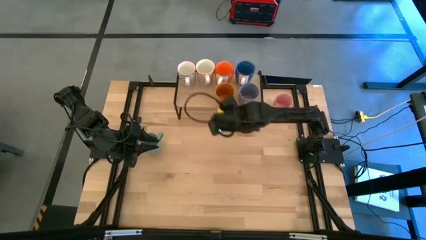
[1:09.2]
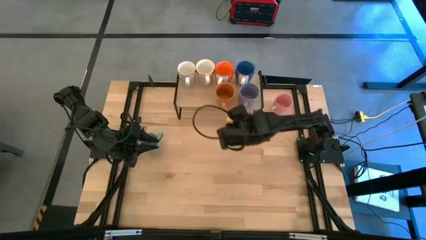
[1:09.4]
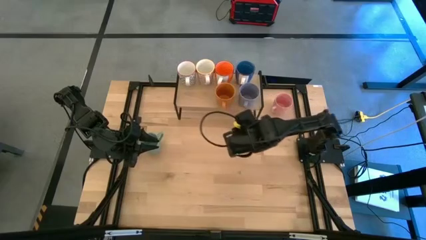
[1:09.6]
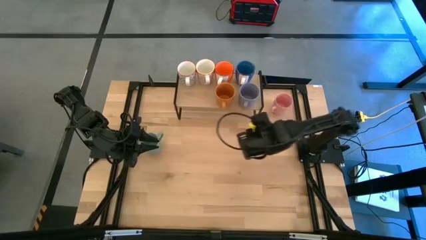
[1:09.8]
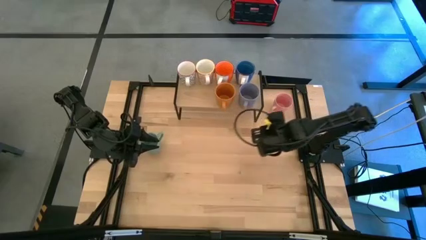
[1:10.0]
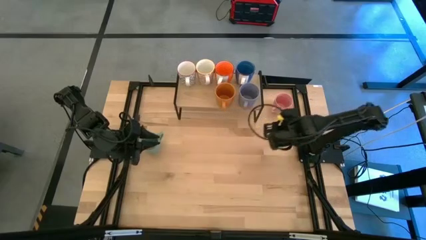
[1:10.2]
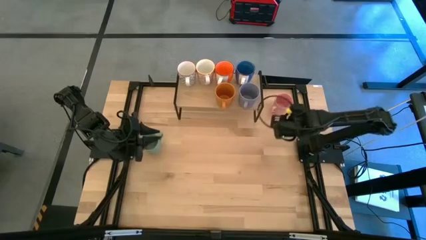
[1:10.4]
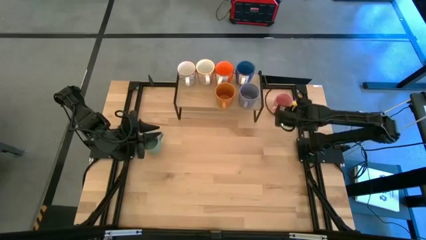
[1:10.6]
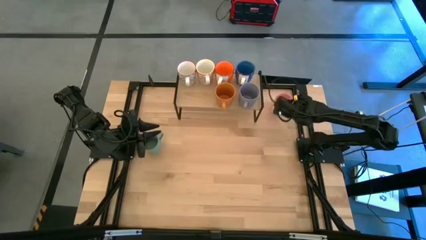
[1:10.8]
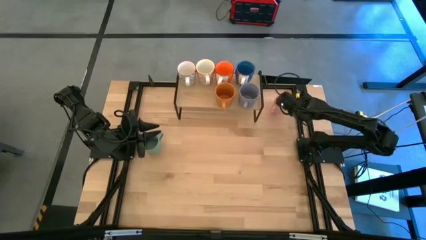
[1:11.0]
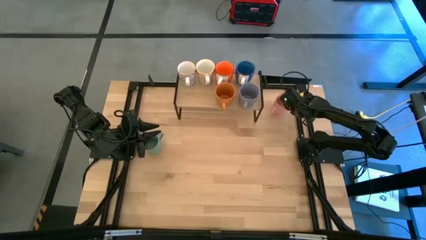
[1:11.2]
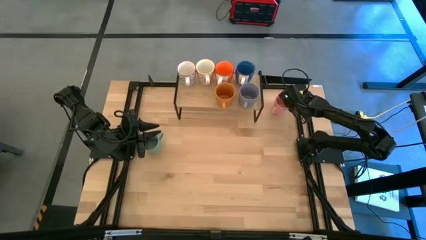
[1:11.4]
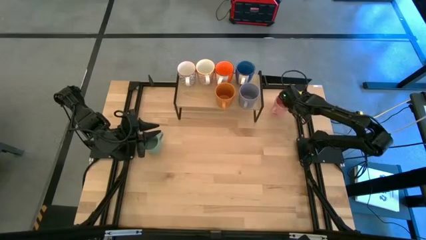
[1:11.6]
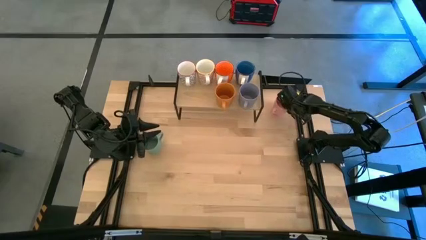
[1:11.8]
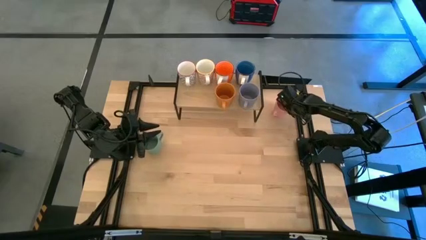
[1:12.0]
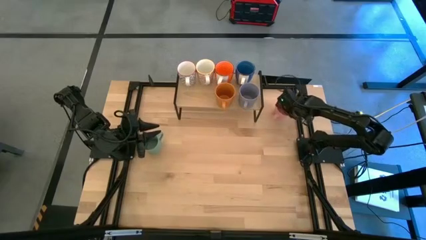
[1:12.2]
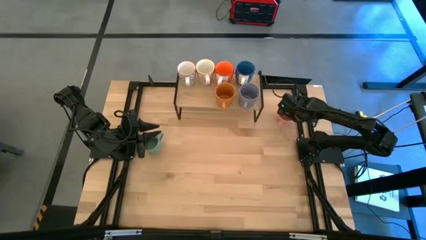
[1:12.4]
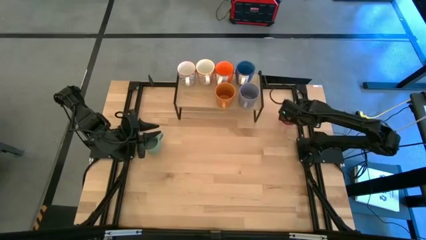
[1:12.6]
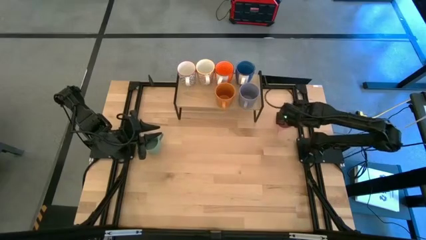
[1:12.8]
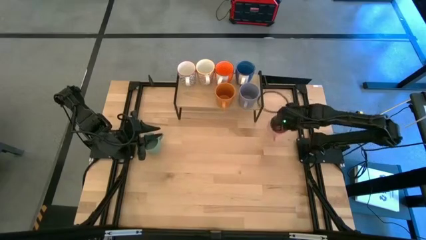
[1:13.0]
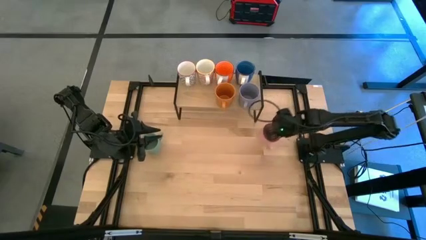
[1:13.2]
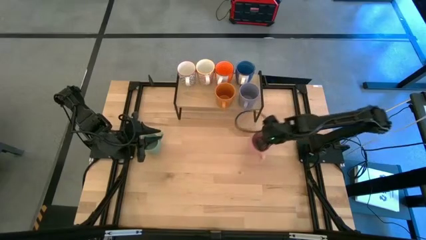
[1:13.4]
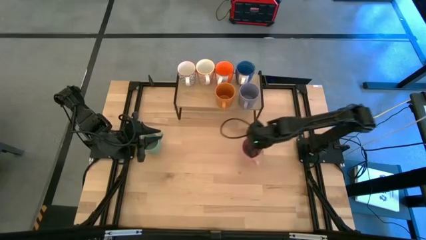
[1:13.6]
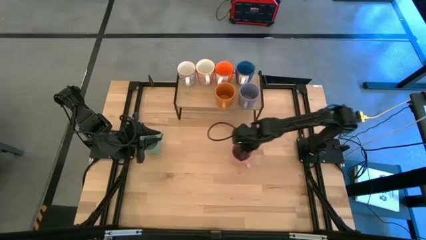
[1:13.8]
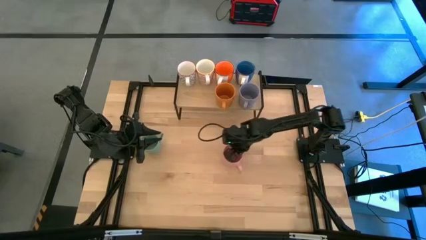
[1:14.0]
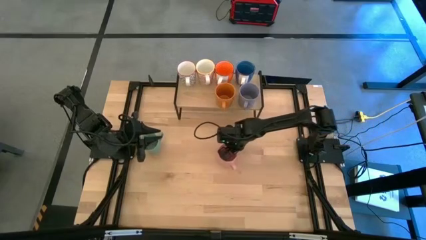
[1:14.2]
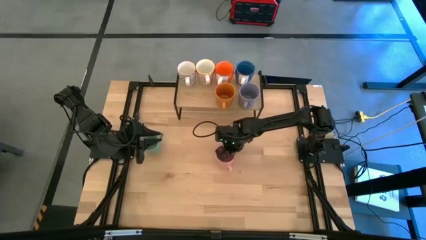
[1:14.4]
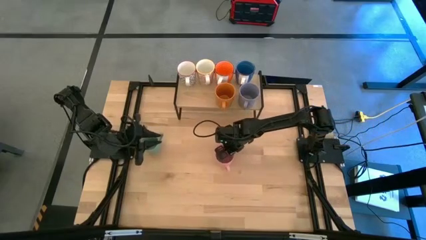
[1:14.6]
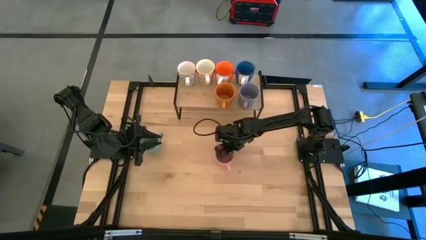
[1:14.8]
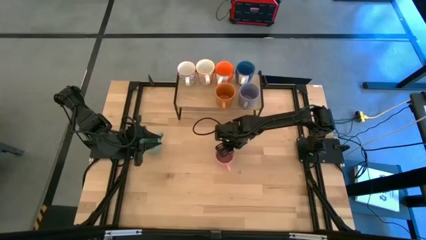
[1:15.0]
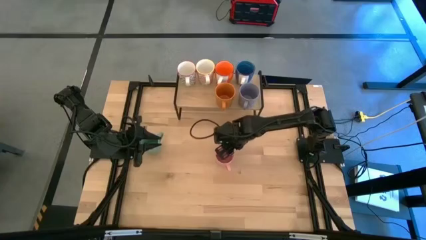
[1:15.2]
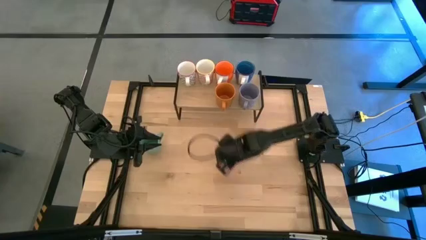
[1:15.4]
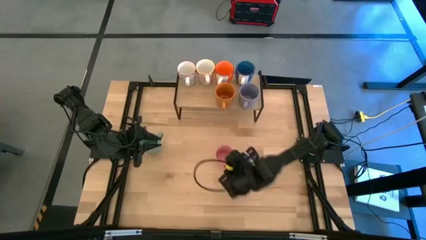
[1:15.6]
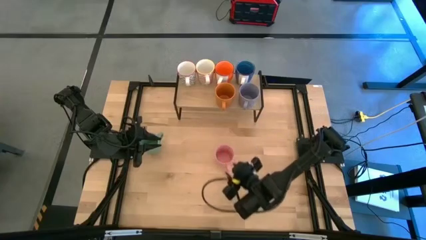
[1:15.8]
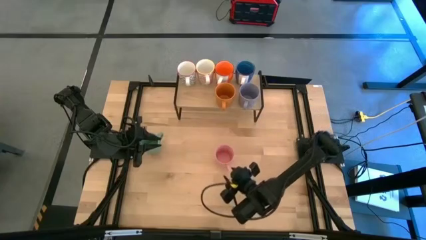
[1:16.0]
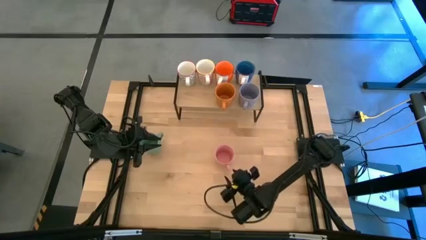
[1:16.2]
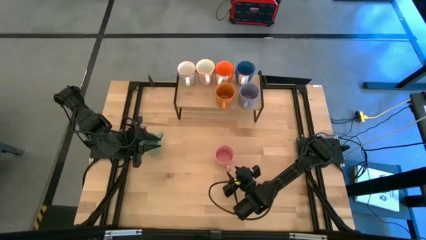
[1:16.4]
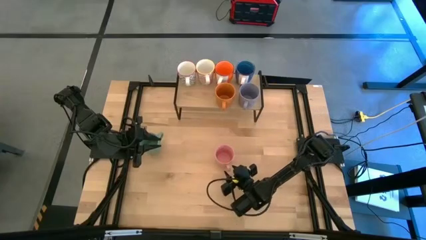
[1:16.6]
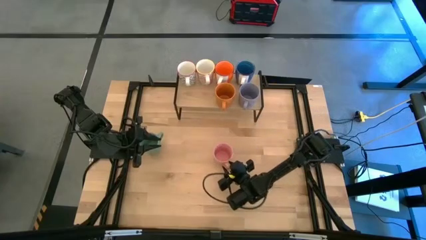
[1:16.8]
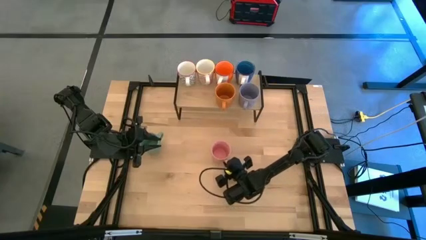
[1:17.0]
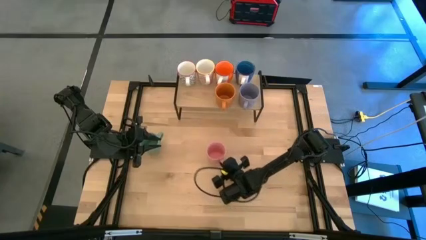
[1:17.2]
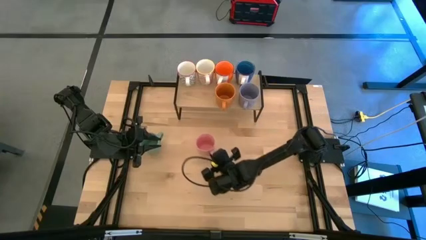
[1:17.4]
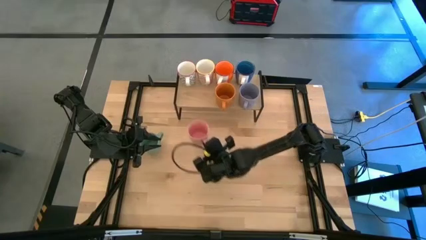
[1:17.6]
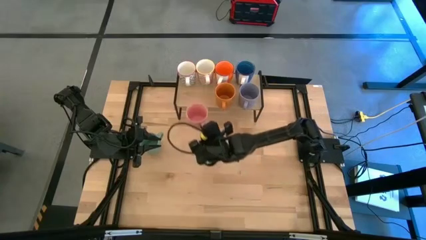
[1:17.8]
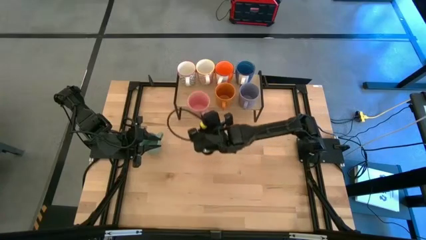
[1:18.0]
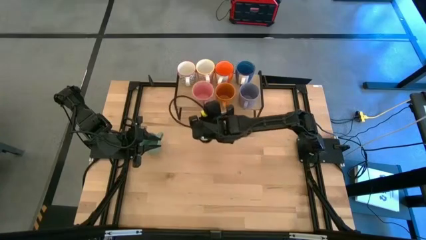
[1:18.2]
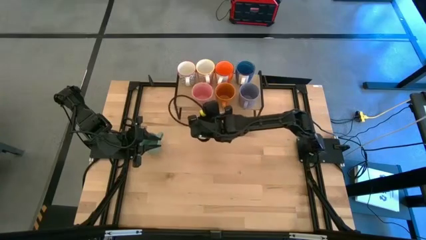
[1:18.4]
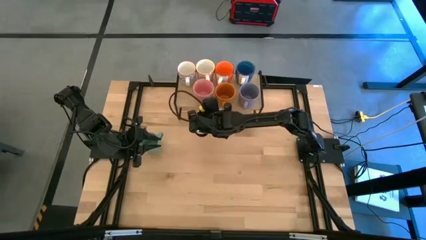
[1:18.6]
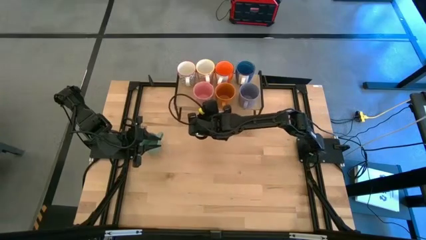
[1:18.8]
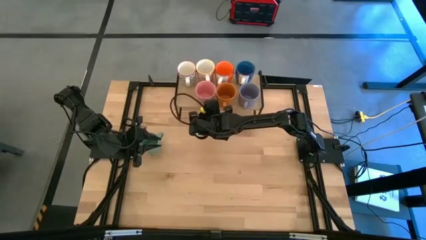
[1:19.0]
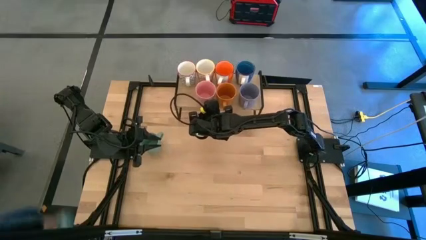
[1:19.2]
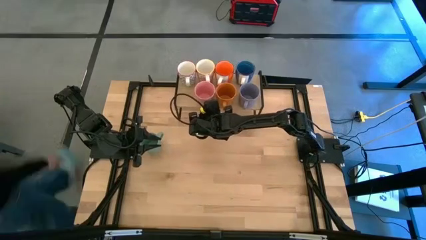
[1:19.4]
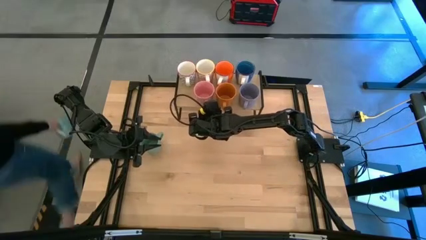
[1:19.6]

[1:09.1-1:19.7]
Task: Place coffee mugs
Put the pink mug on the shelf

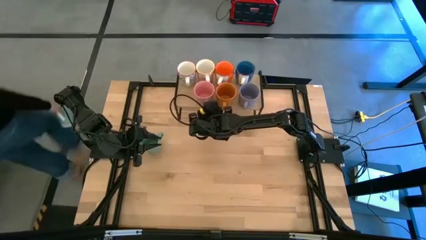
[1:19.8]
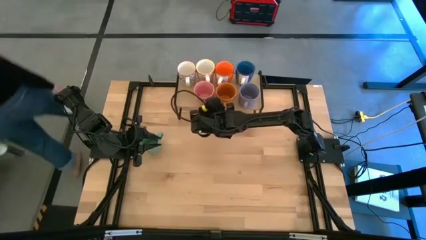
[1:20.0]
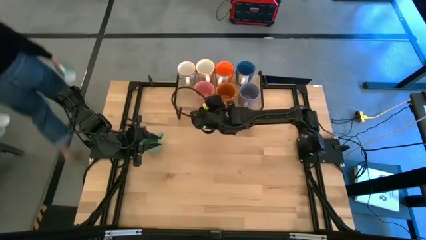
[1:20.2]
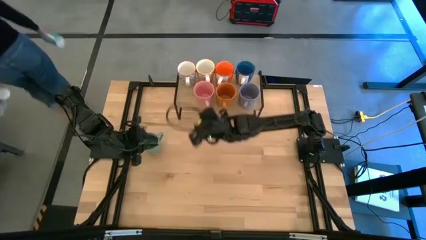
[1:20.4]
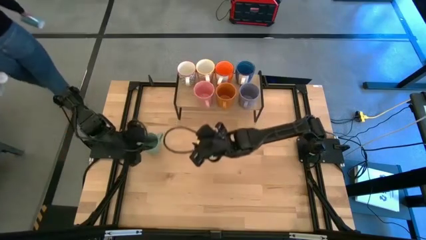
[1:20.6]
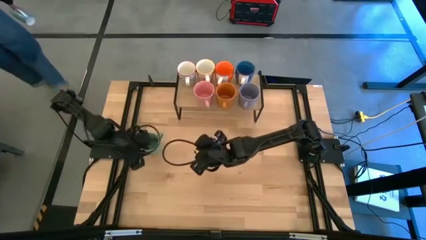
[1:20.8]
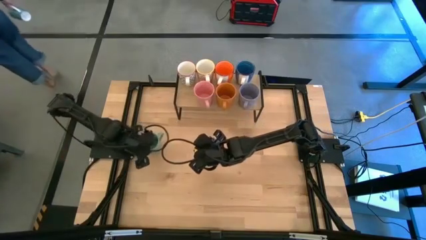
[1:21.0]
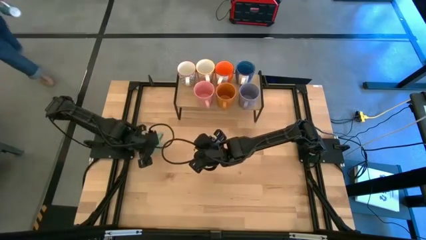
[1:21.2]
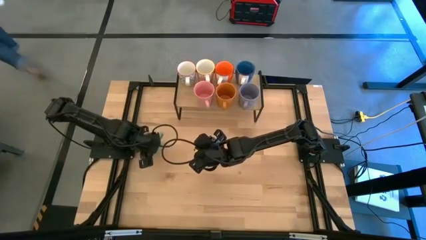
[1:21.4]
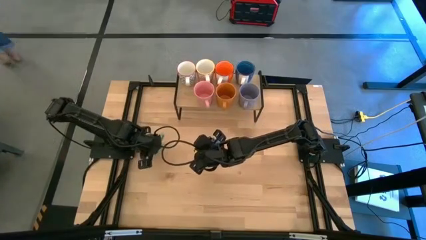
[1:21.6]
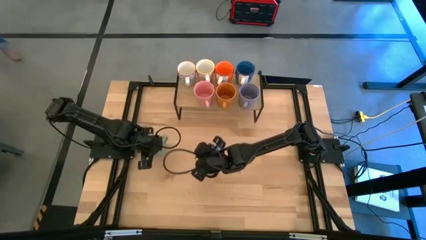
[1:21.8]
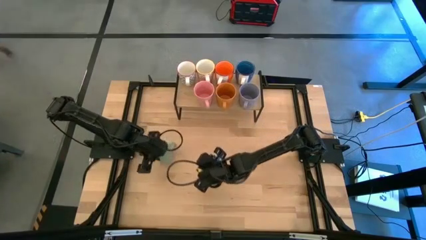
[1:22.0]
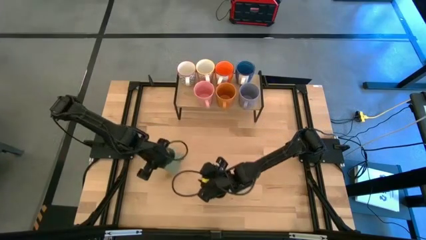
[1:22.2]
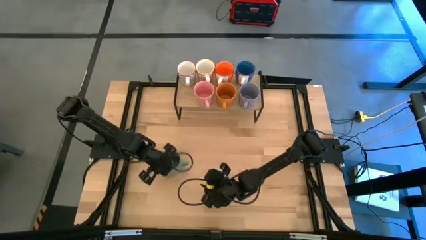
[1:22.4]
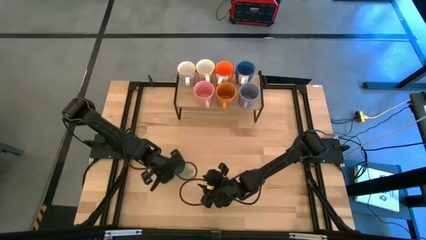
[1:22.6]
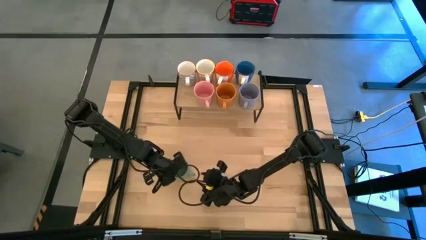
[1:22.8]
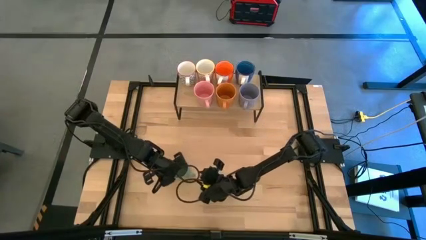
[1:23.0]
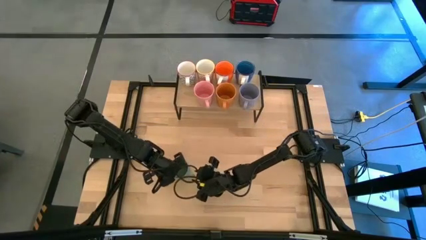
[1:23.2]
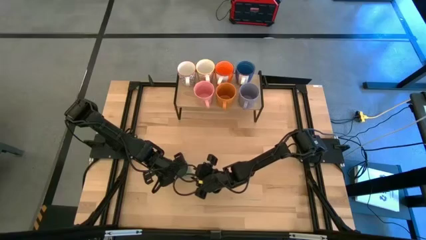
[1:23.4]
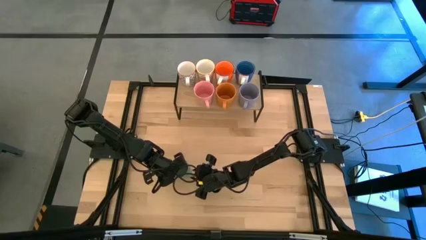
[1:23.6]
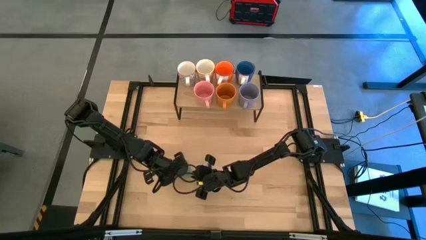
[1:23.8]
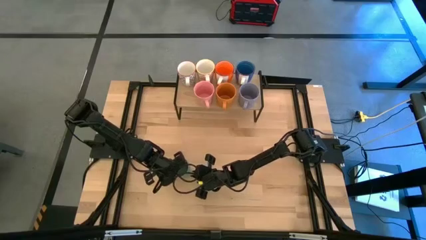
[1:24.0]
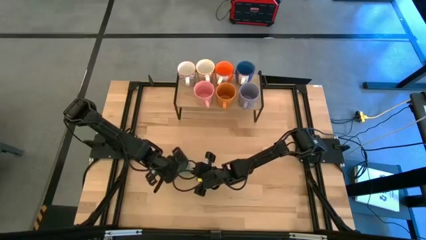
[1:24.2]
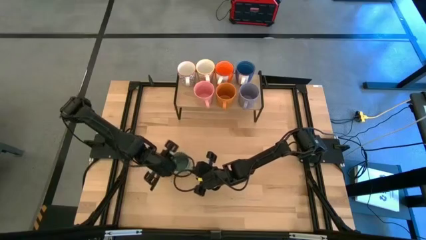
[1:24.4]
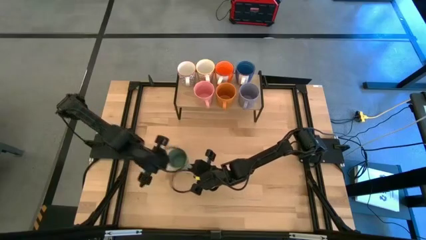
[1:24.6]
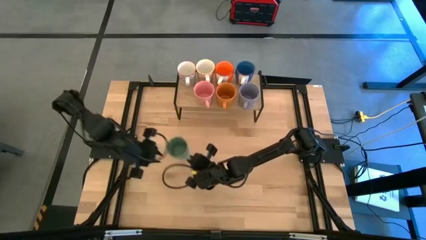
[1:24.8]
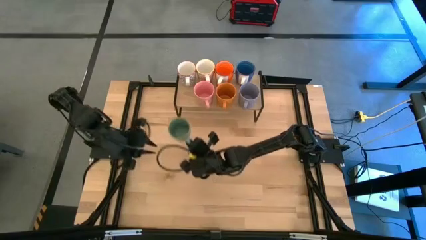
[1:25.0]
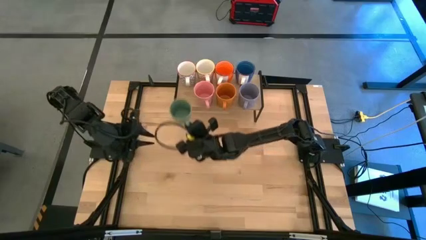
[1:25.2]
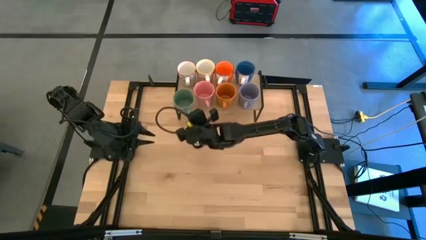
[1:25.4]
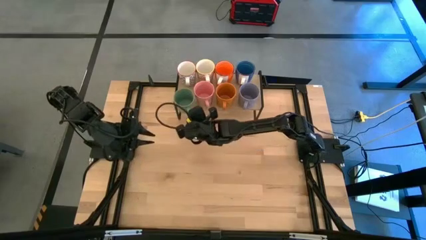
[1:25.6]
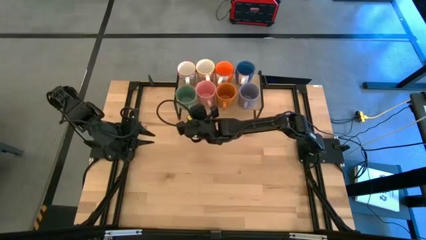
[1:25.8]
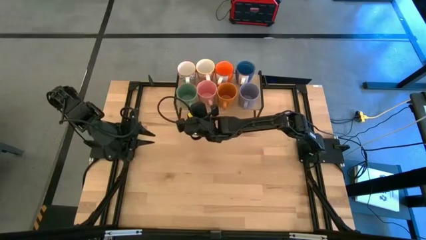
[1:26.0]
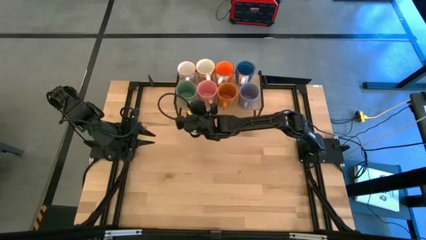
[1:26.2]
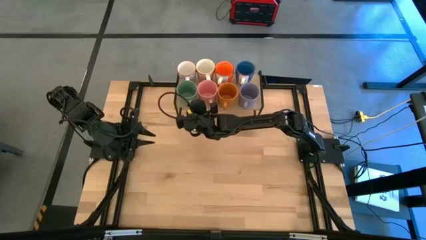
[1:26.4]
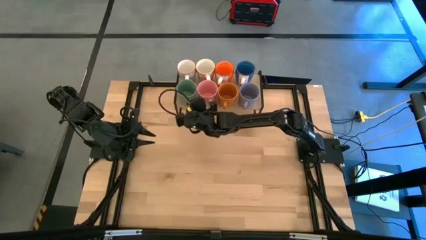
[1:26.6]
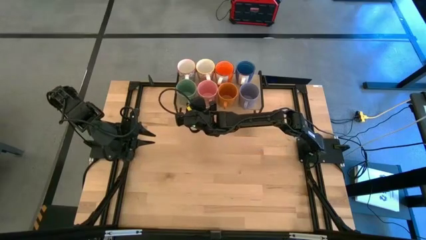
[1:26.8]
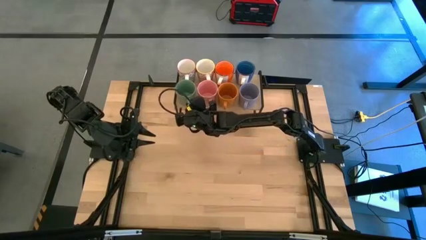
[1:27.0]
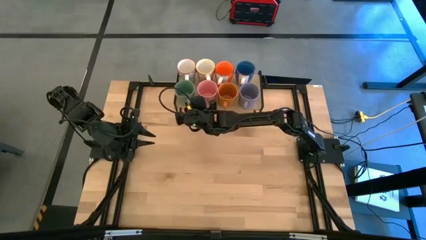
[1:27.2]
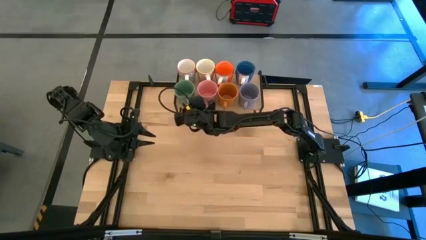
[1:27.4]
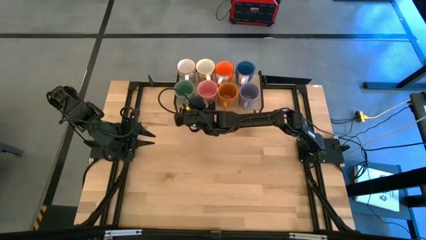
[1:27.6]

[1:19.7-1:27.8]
Put the green mug on the shelf
